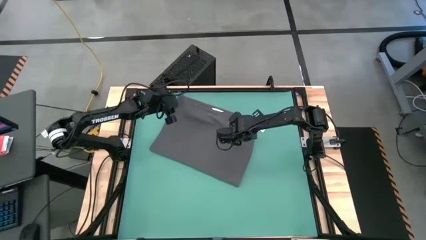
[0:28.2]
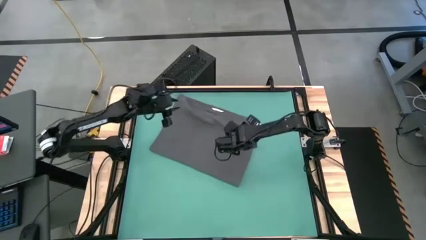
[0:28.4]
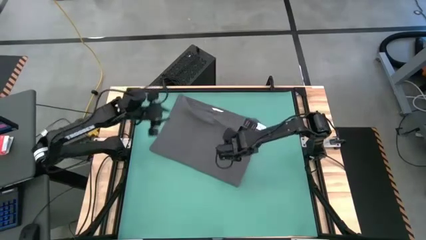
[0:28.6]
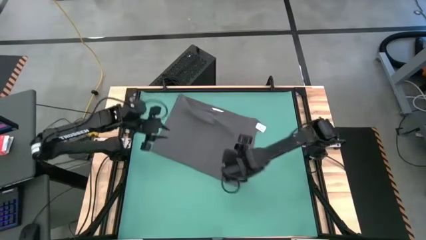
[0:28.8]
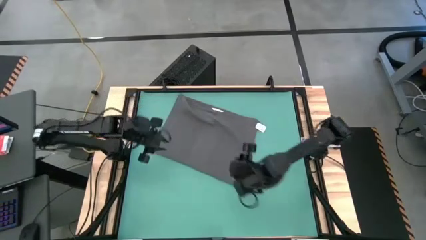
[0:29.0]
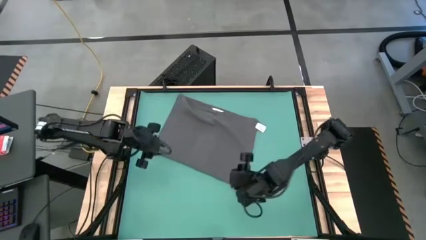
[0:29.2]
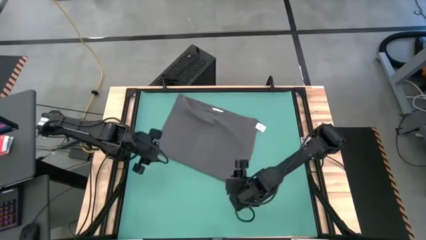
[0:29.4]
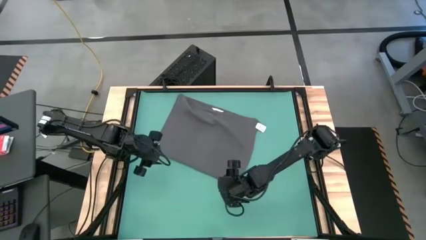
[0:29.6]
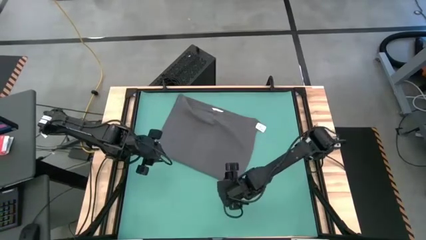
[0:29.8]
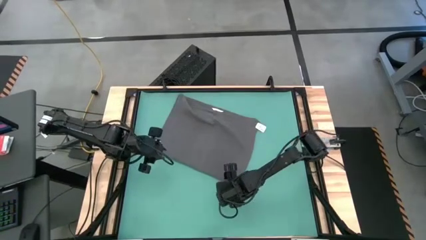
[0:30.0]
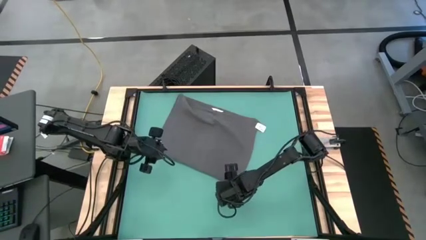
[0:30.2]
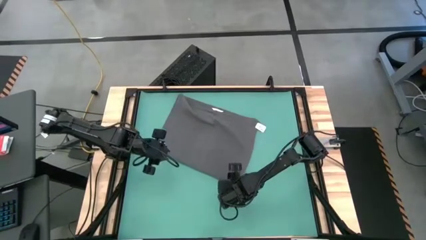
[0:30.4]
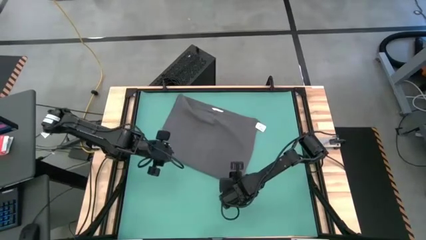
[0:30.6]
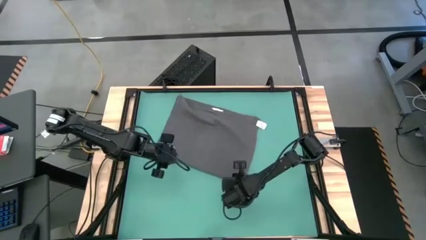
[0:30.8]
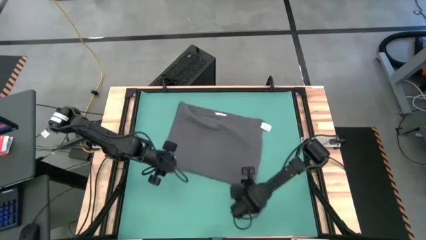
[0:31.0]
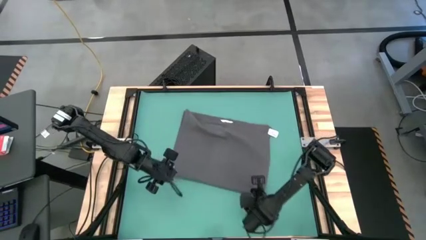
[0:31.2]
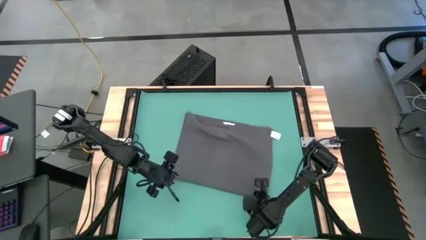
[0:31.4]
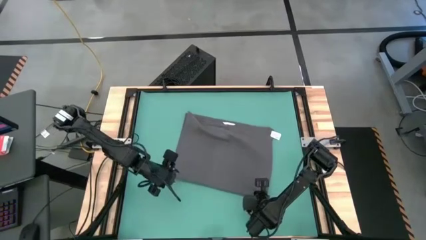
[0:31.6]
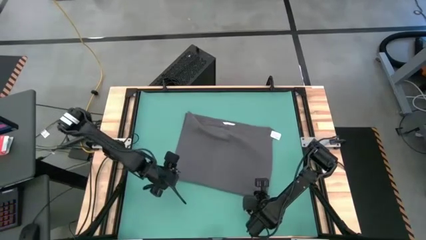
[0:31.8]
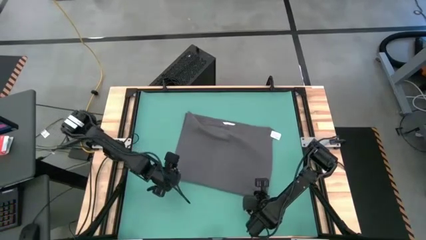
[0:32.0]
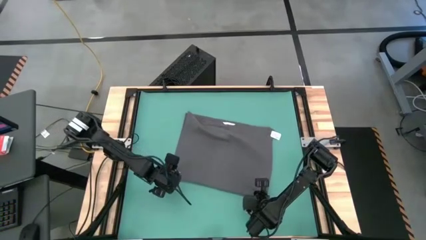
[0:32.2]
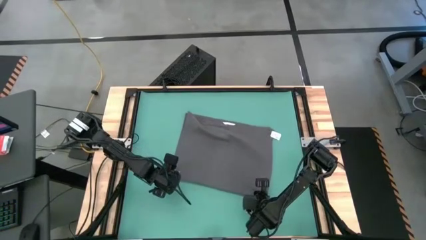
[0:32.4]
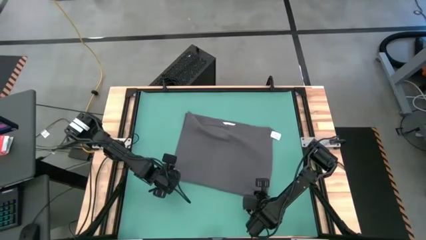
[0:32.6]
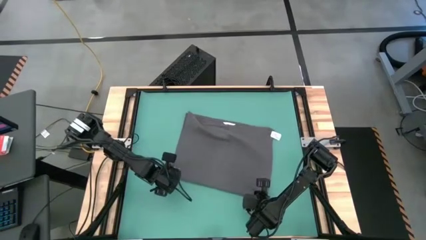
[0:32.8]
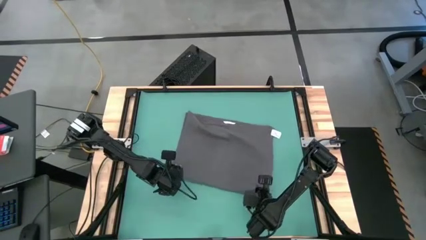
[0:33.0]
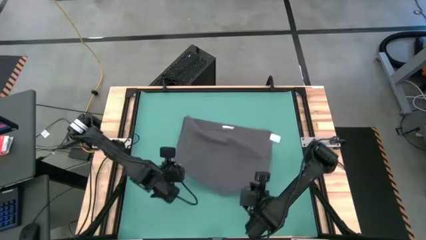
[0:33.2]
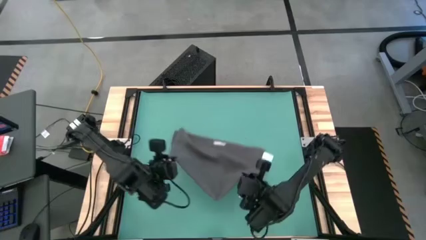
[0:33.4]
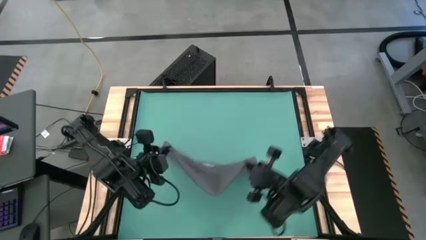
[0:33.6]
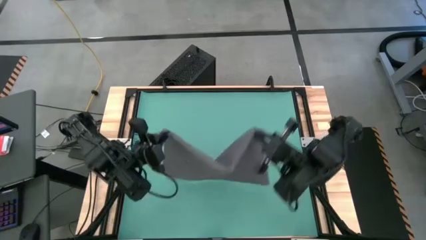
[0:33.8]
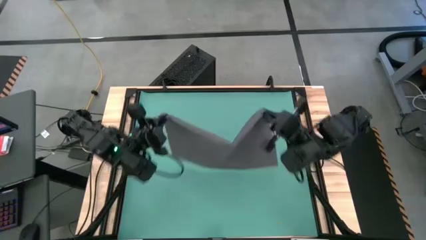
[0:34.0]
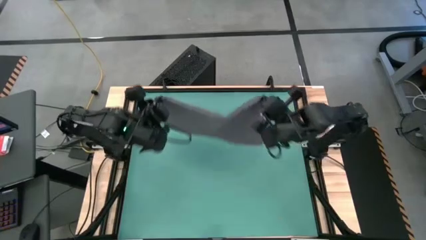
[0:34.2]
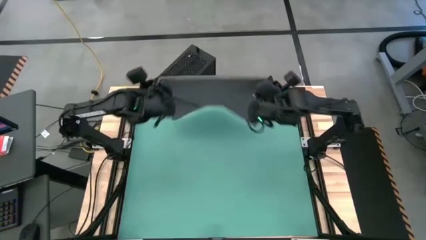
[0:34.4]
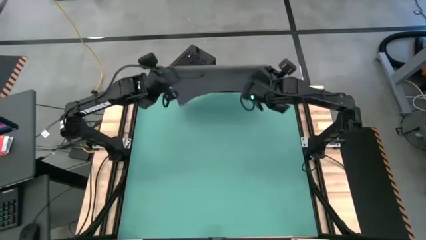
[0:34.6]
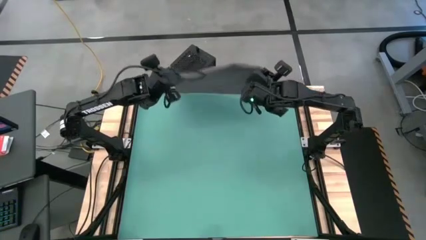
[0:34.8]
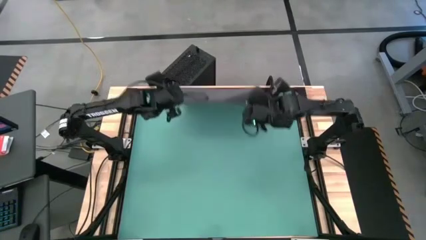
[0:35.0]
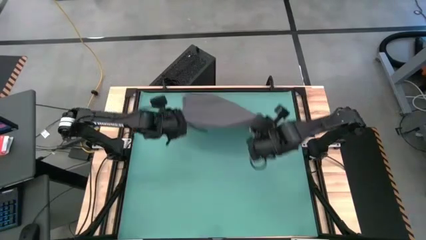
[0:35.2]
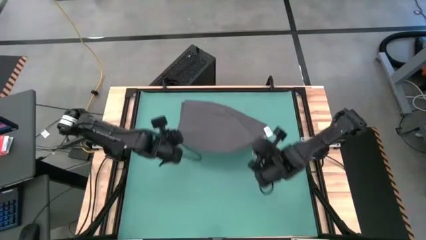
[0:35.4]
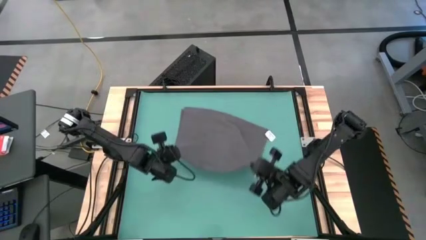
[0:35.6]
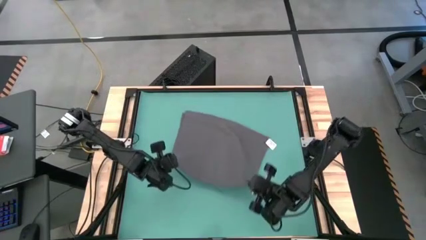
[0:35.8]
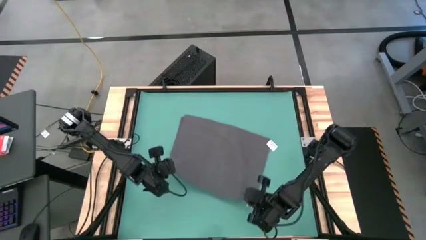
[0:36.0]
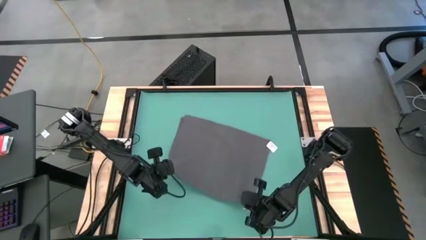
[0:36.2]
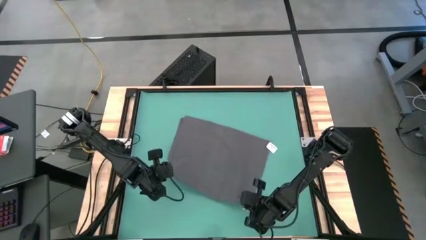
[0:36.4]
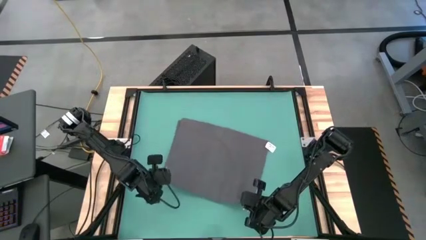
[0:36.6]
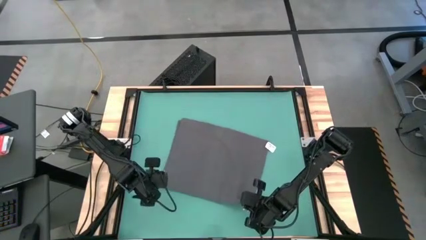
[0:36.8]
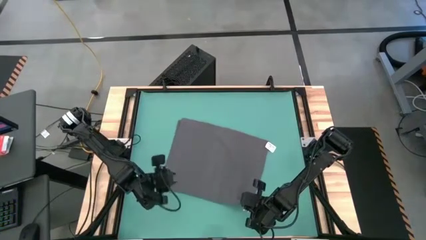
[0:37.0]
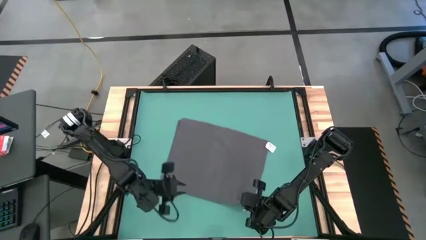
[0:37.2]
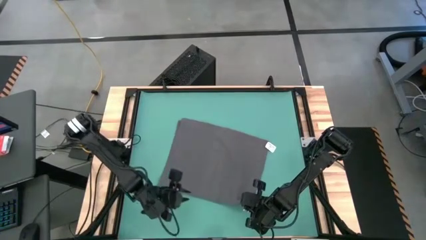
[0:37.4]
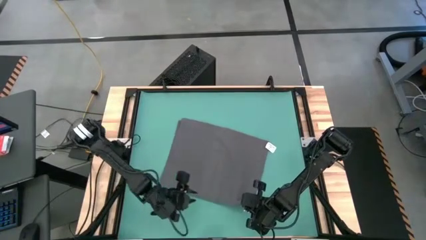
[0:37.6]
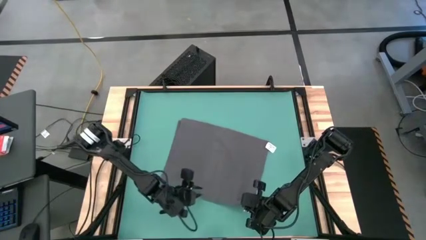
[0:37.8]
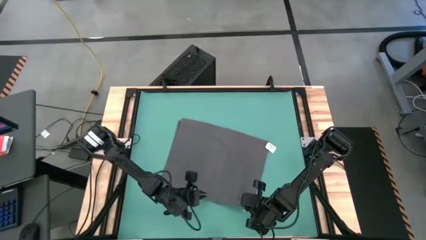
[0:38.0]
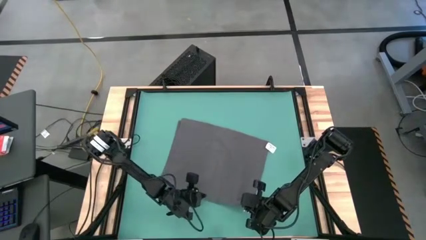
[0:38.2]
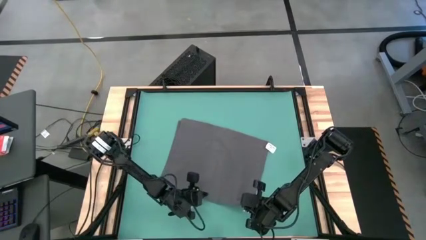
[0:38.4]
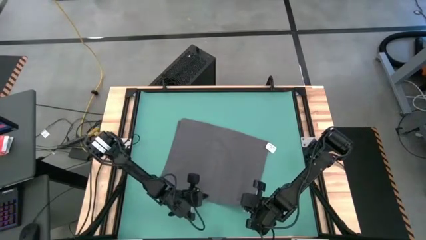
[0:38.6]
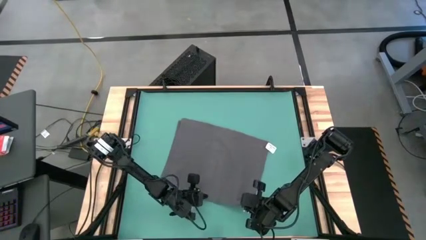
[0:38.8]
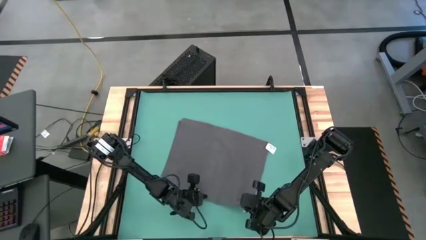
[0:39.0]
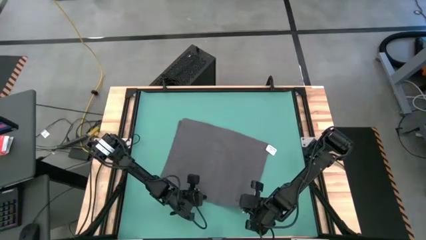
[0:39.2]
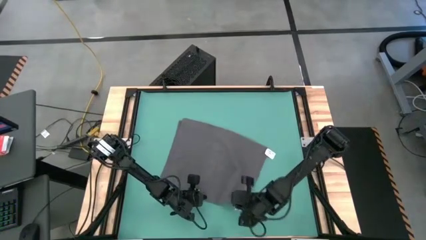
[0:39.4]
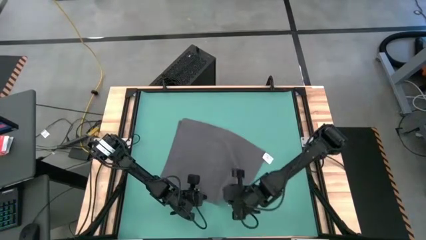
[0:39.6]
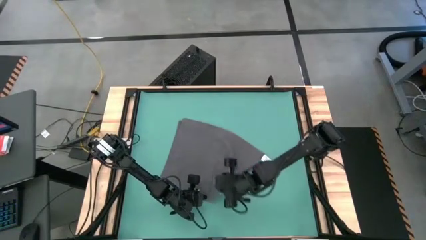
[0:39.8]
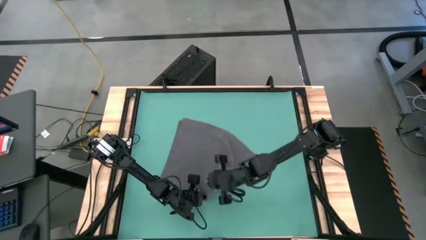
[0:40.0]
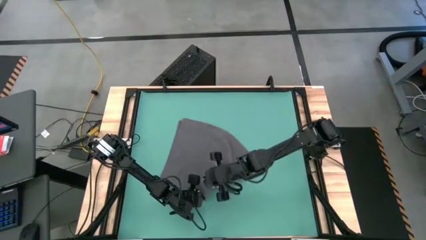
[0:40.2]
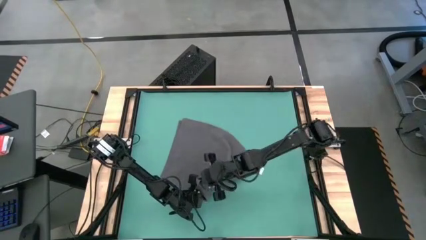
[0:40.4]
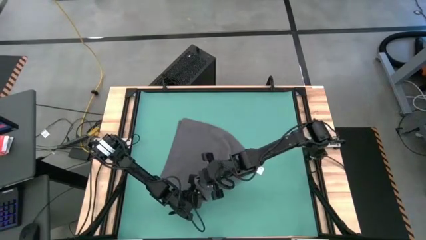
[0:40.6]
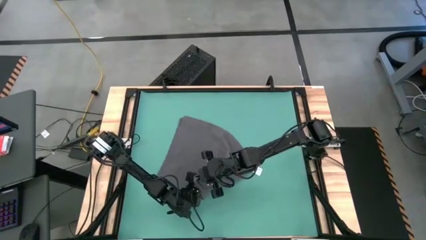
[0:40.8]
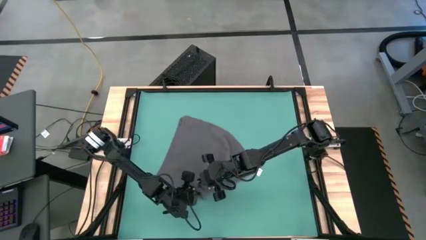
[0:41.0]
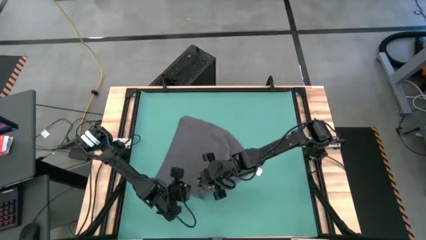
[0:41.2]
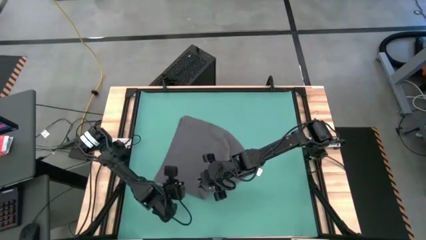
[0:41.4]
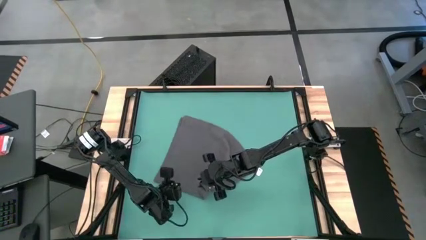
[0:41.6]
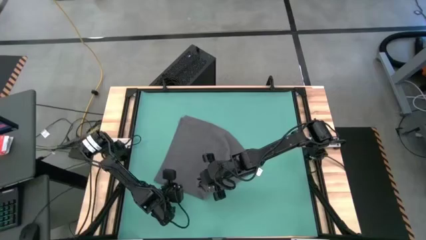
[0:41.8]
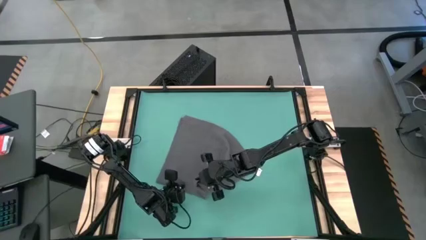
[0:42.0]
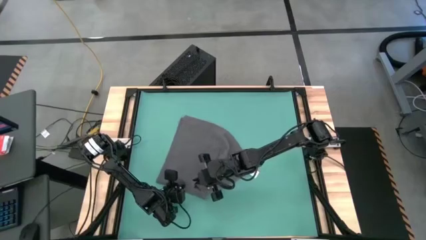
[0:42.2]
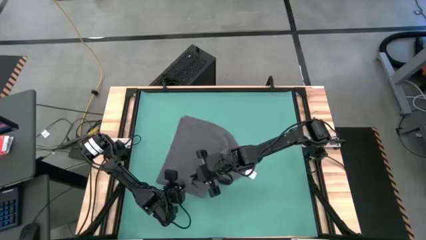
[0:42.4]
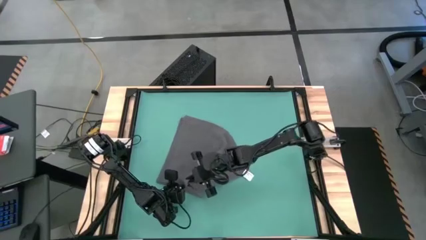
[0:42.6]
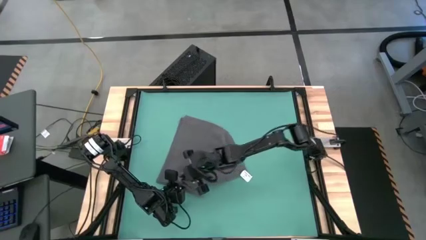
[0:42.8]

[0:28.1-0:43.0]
Task: Roll towel
Fold the gray towel

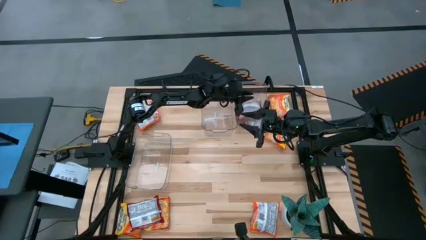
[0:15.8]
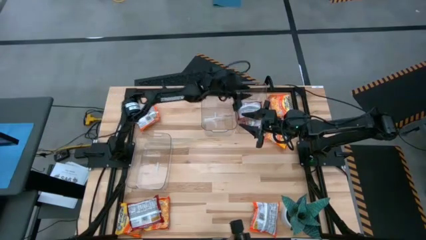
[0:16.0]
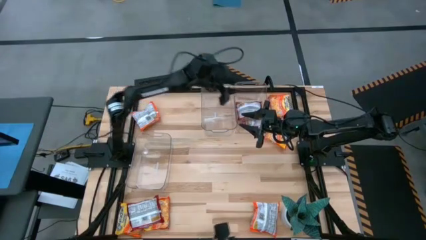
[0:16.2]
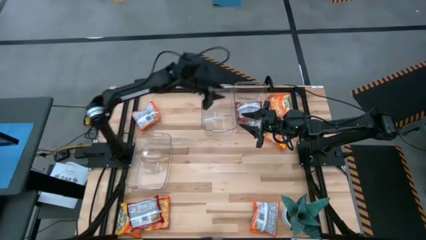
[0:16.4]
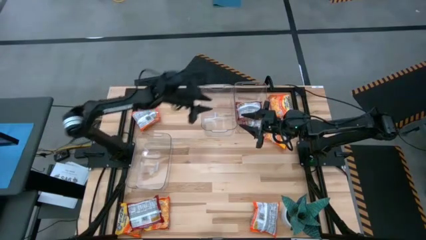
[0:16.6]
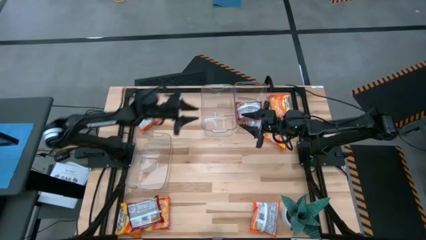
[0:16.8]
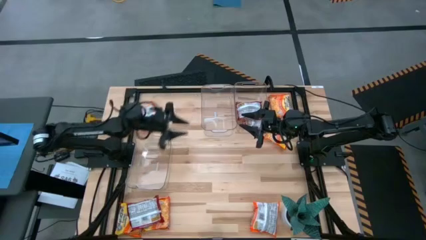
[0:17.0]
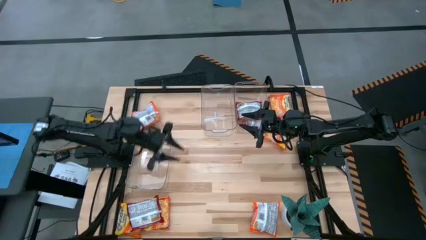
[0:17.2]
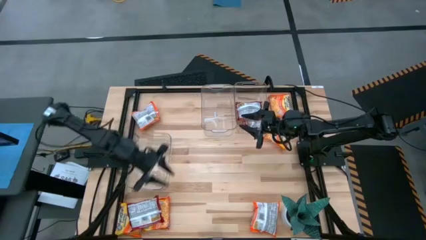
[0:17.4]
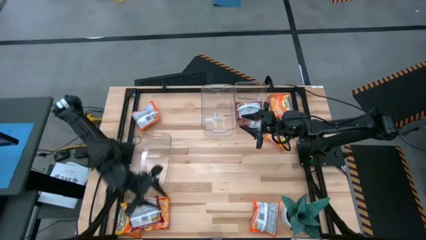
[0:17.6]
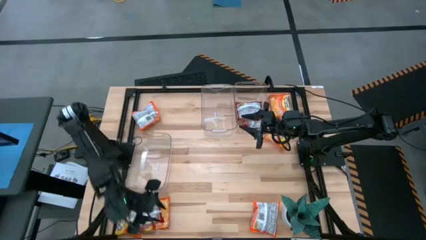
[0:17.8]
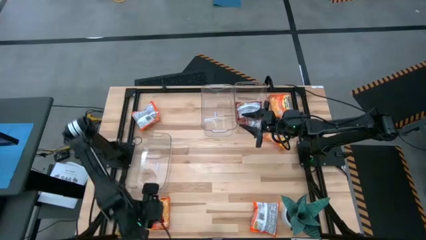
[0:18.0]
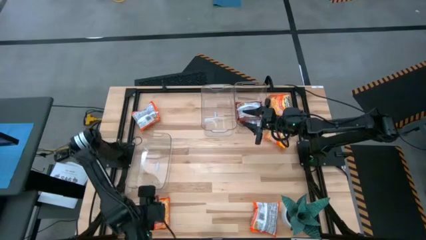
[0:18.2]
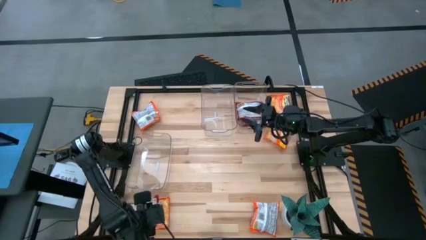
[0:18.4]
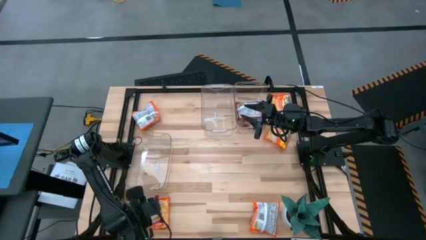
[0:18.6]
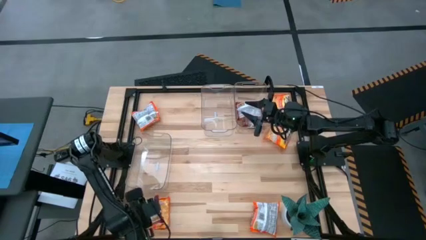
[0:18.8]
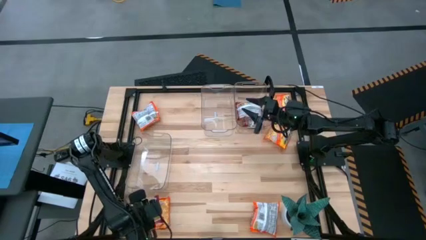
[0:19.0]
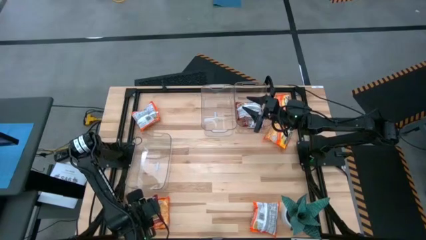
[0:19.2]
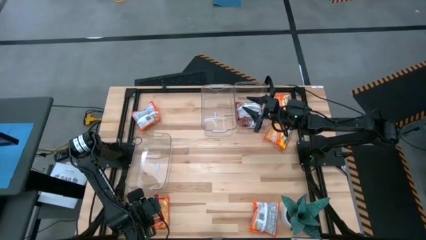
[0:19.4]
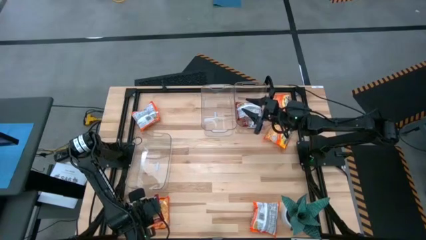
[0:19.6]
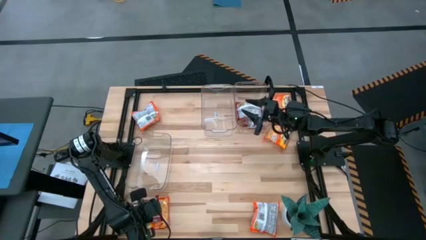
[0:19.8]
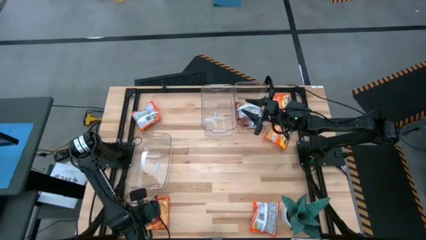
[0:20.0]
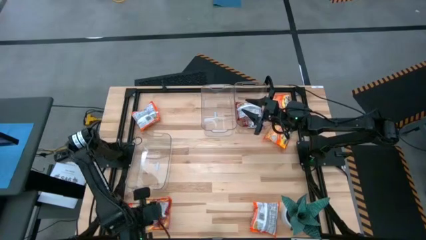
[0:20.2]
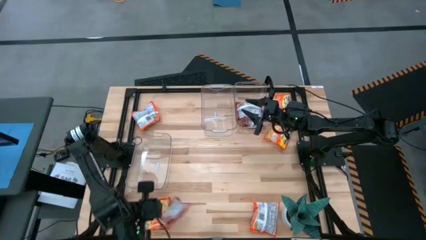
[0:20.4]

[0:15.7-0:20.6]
Task: Sort Maruchan noodles
Put the red noodle pack into the top right transparent bin
